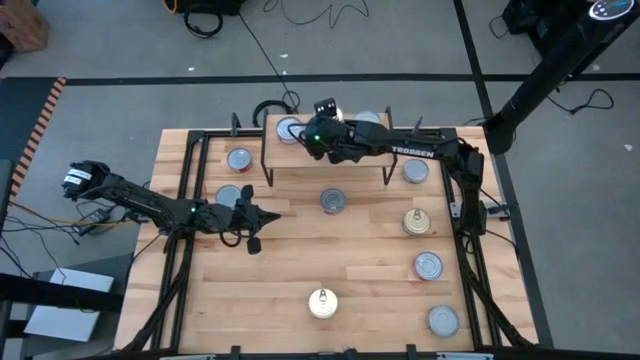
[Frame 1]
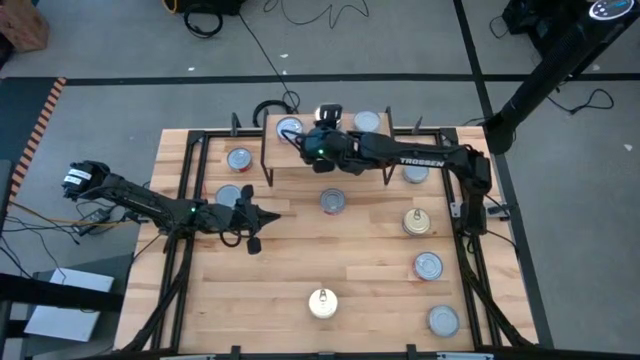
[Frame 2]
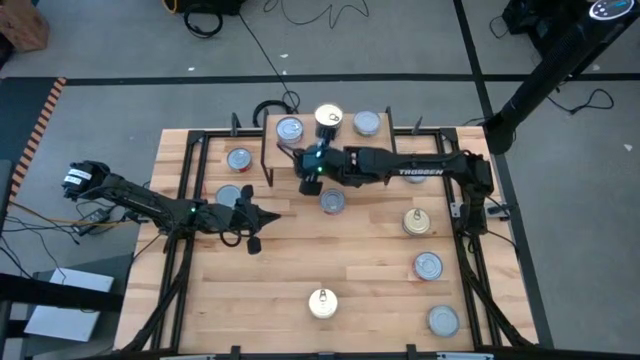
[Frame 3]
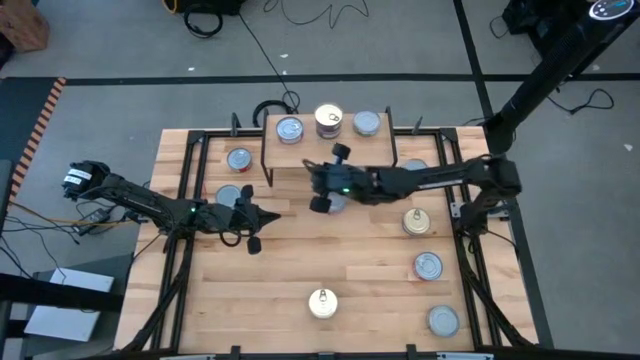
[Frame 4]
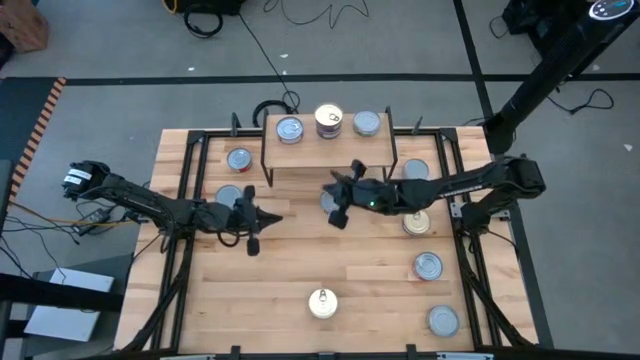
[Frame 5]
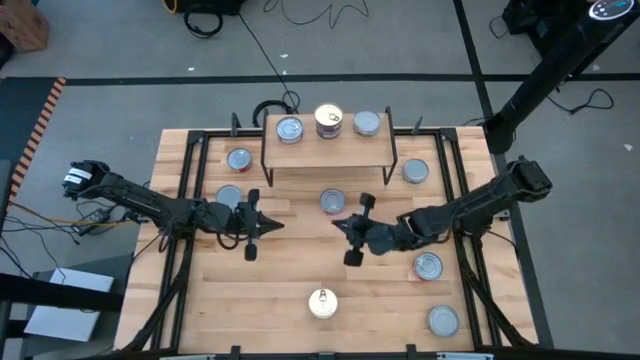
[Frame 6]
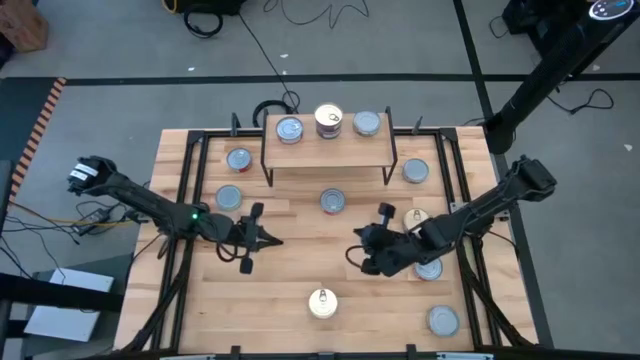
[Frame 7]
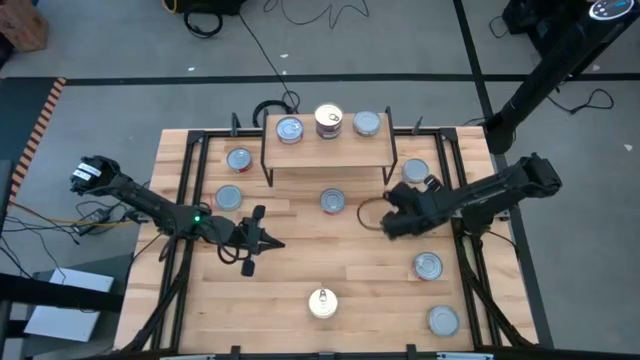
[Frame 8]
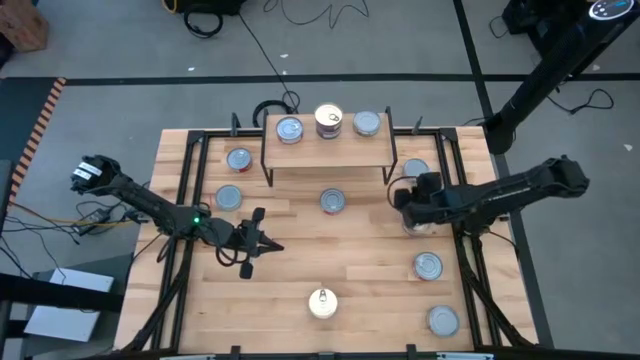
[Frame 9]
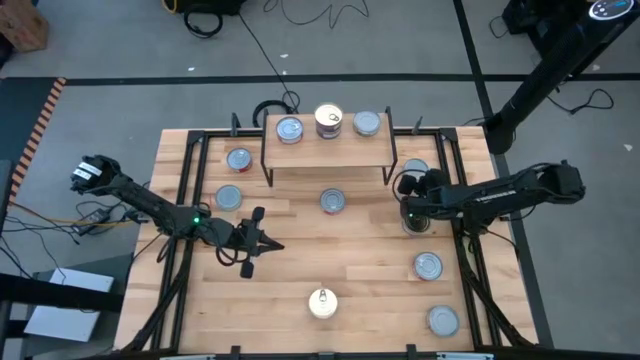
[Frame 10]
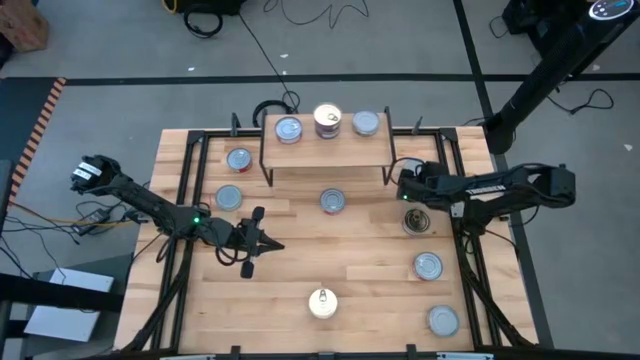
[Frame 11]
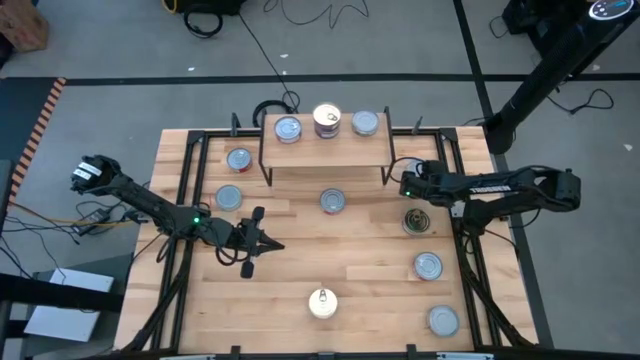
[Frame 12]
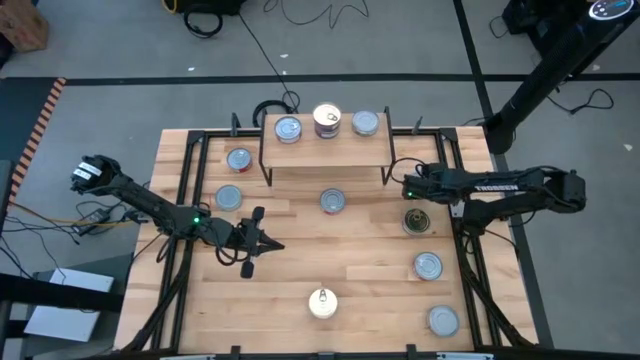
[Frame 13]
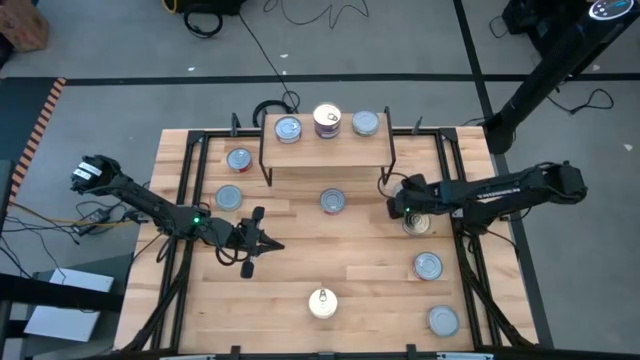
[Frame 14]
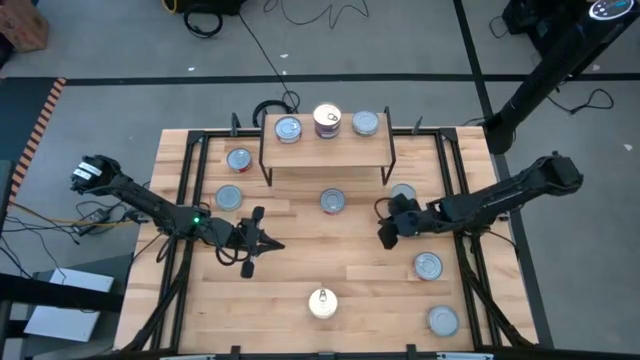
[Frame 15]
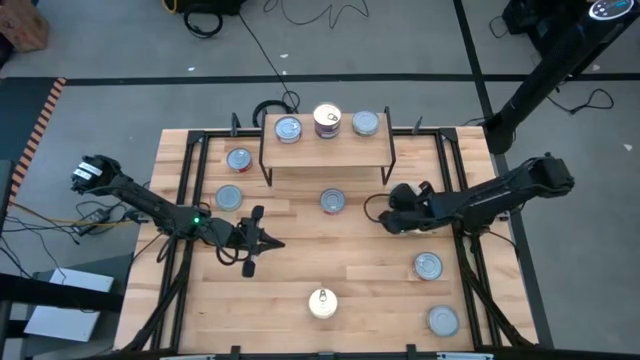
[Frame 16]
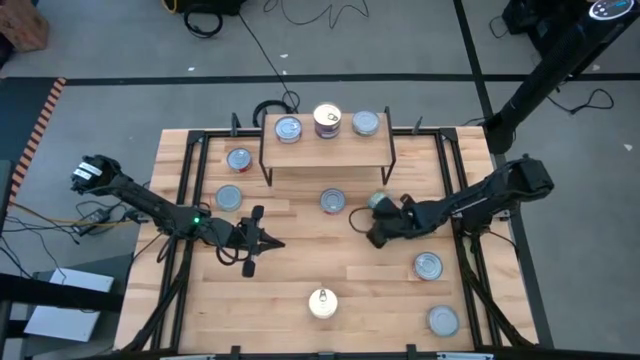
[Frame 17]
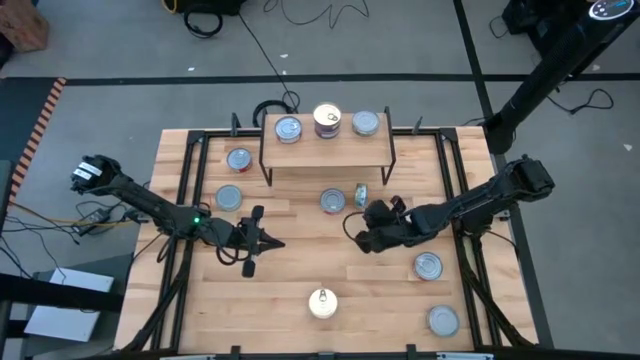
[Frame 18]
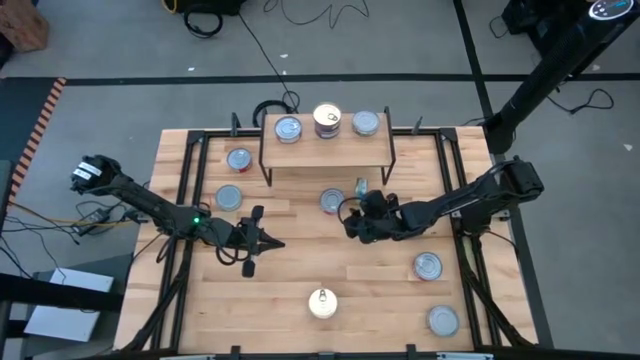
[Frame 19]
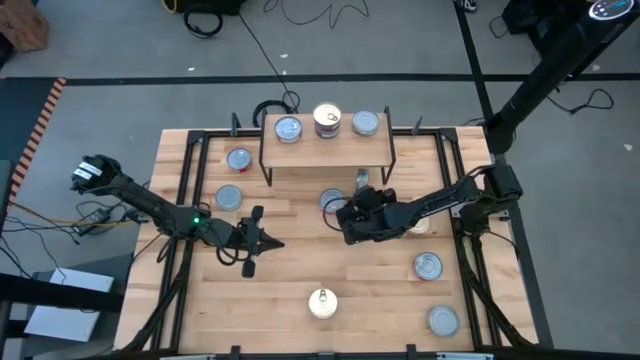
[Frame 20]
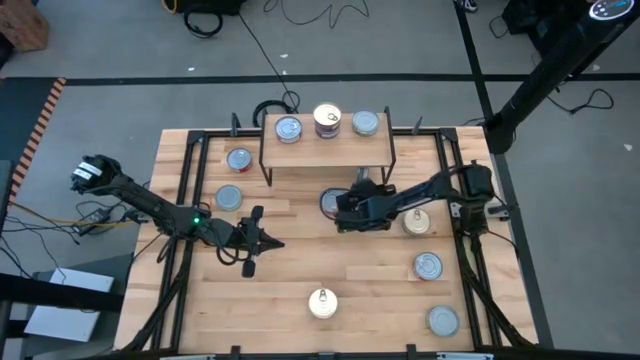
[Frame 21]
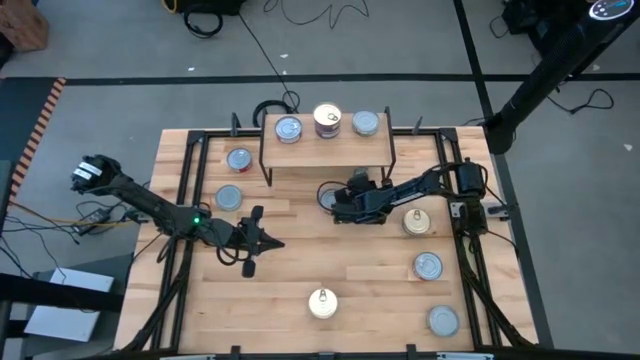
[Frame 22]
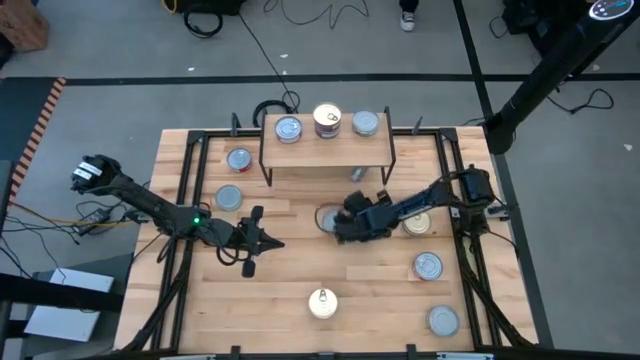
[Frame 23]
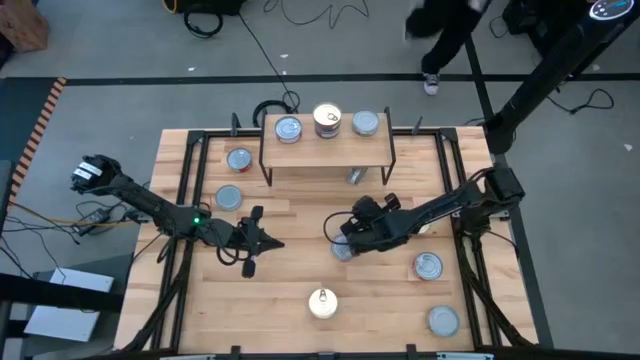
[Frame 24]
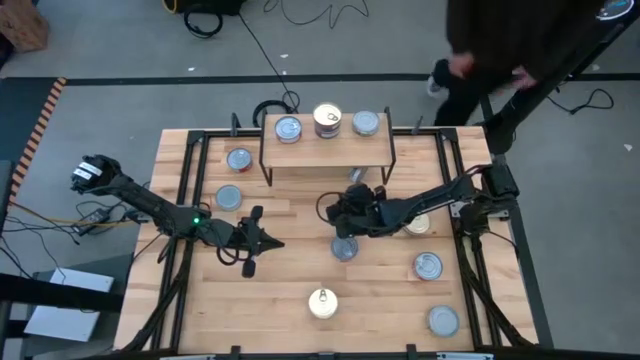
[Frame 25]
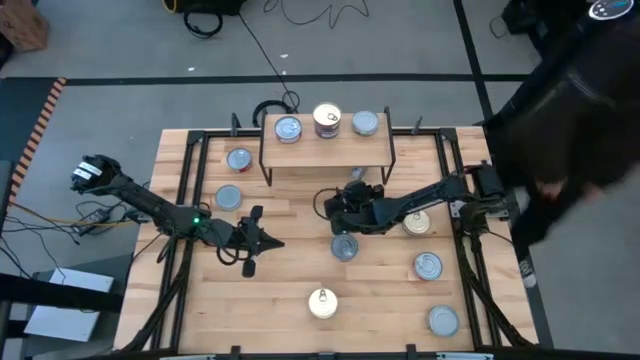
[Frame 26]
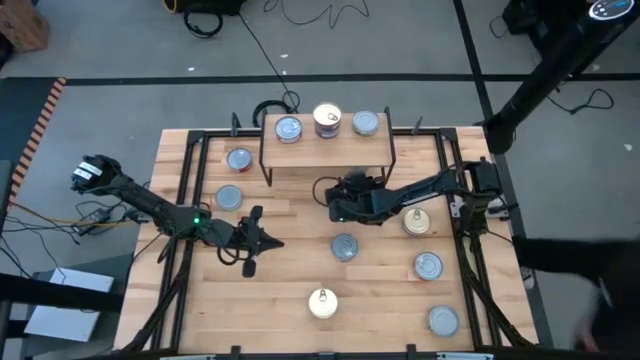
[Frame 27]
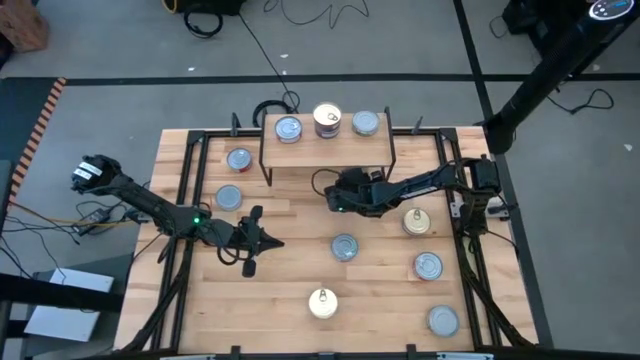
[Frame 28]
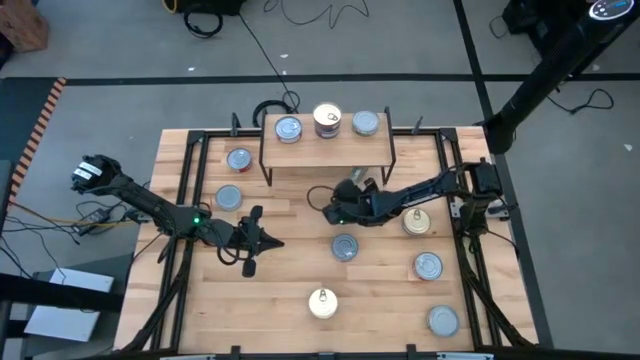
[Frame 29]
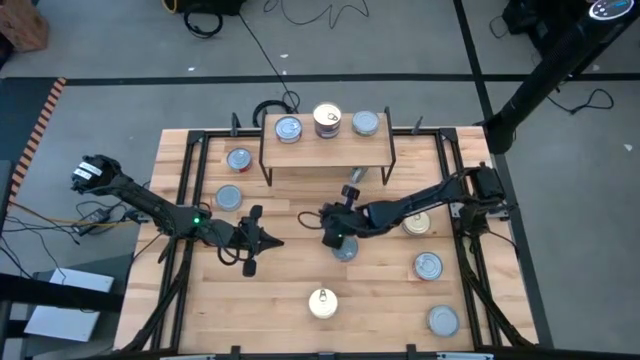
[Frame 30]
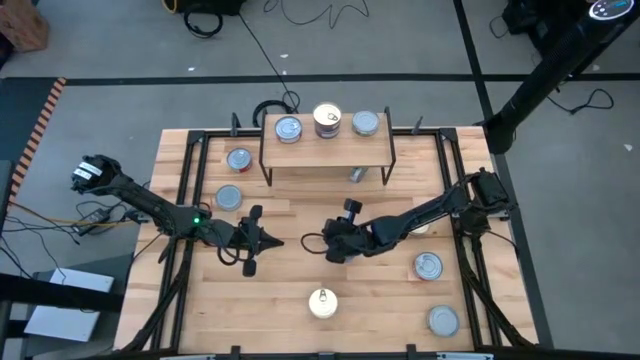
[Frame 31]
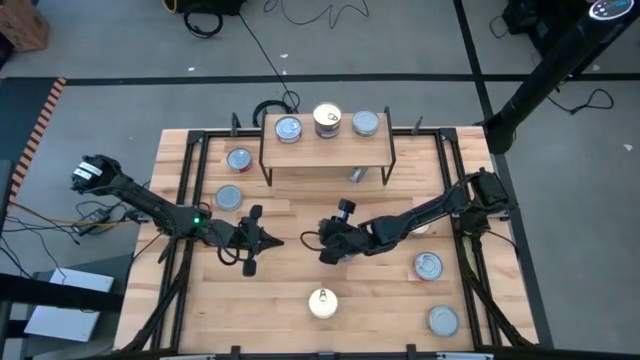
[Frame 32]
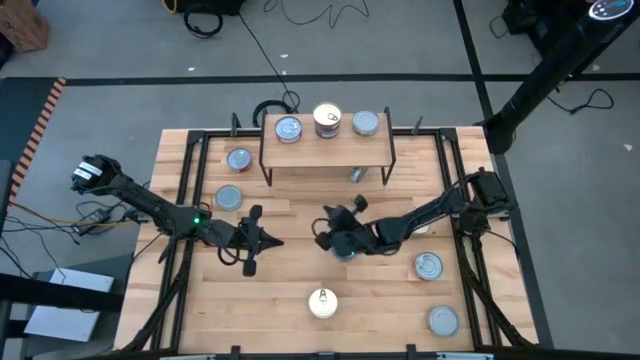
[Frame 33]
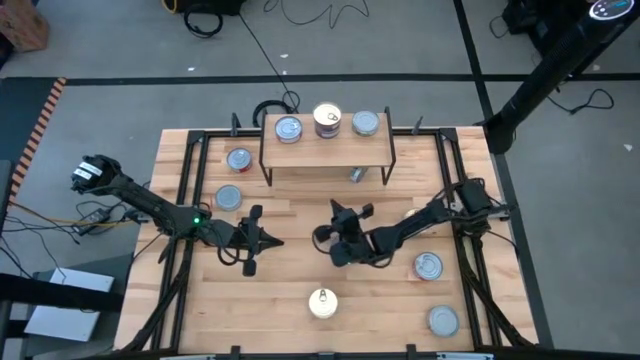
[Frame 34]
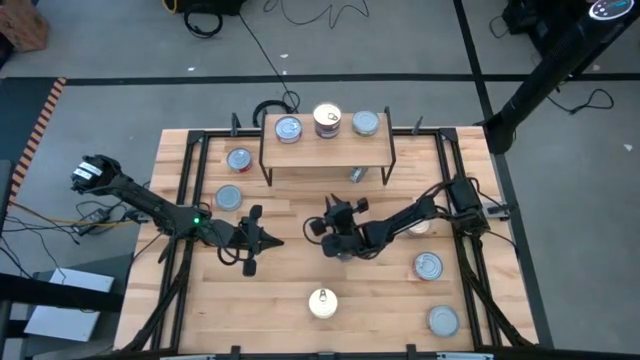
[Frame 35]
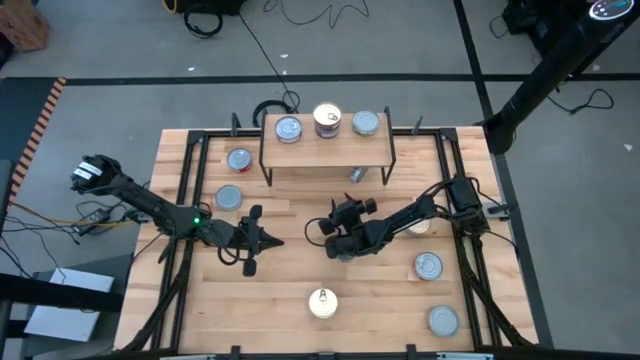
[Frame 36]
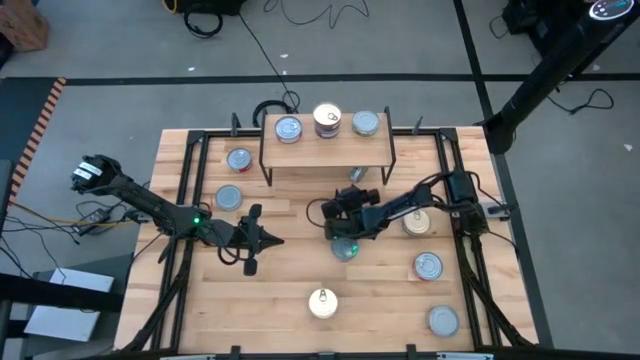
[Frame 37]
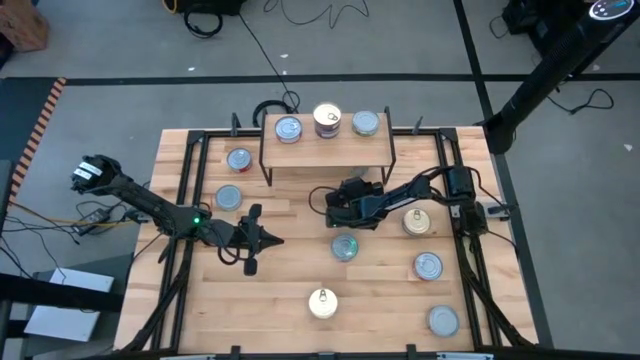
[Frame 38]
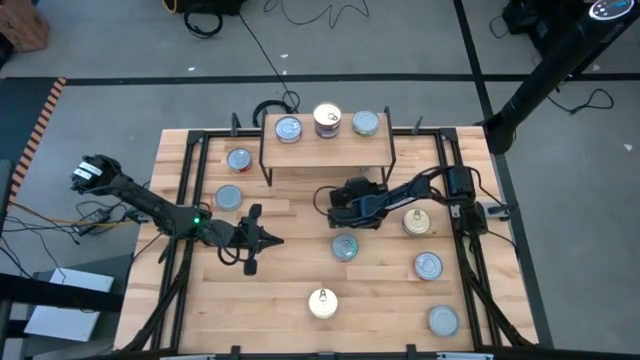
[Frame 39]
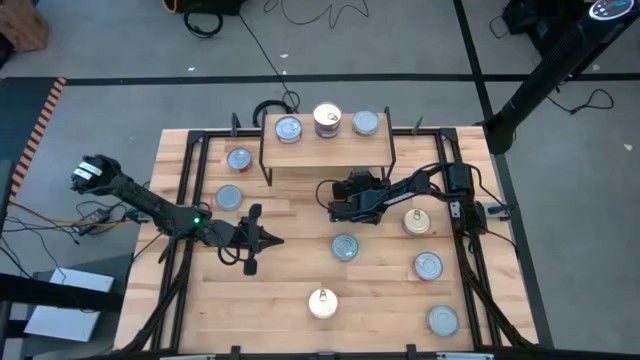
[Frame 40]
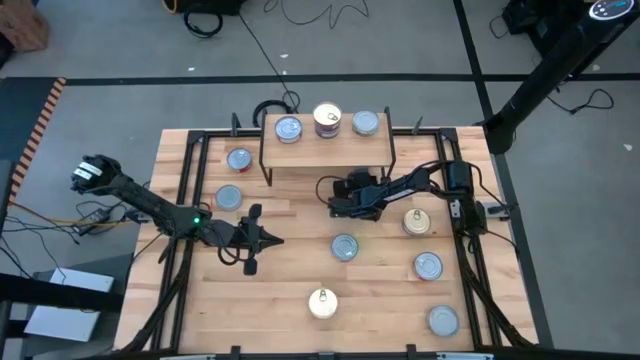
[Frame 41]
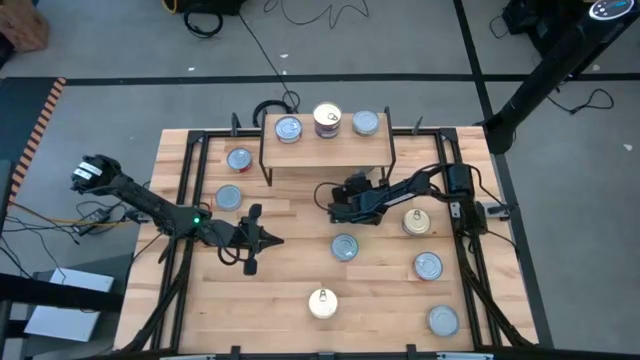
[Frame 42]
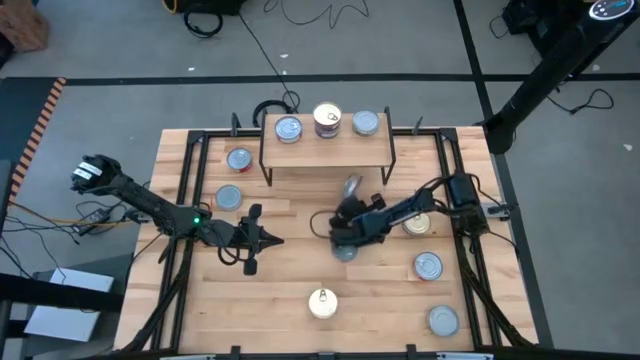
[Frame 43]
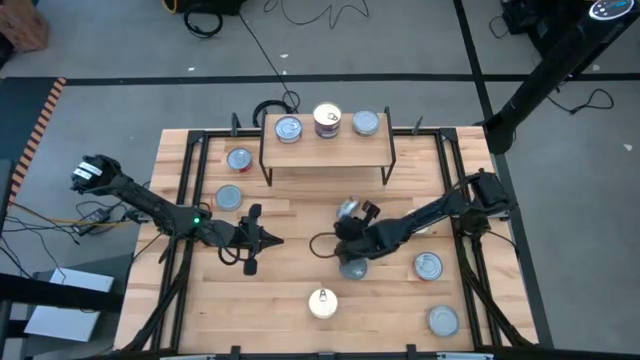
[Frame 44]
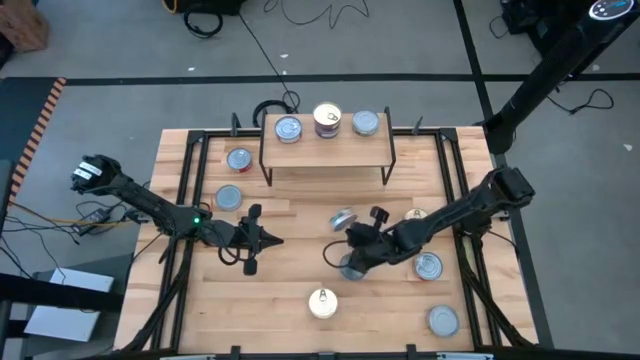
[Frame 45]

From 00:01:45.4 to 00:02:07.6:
Task: Stack canned seafood by type on shelf
Stack the green tuna can on top of the green tuna can on the shelf
